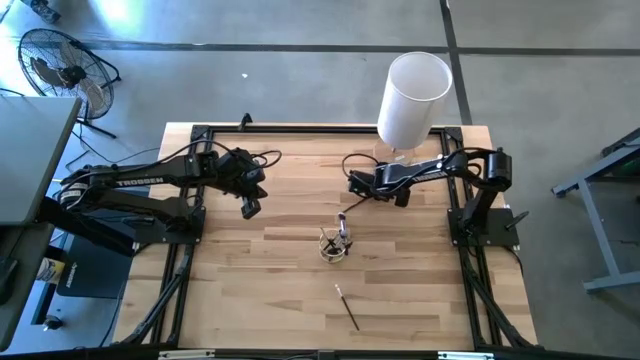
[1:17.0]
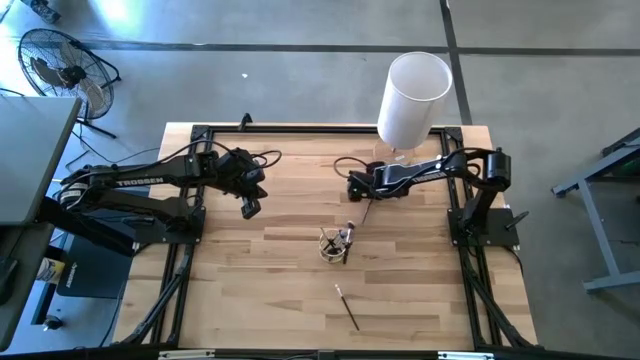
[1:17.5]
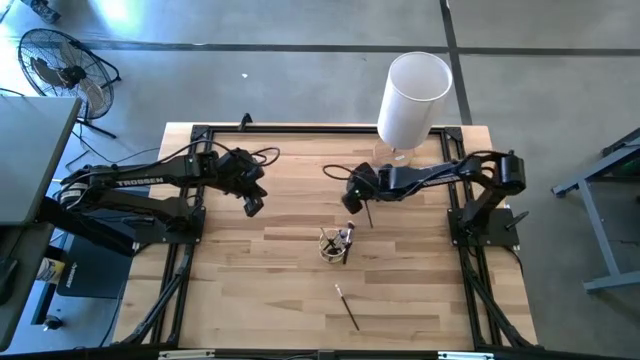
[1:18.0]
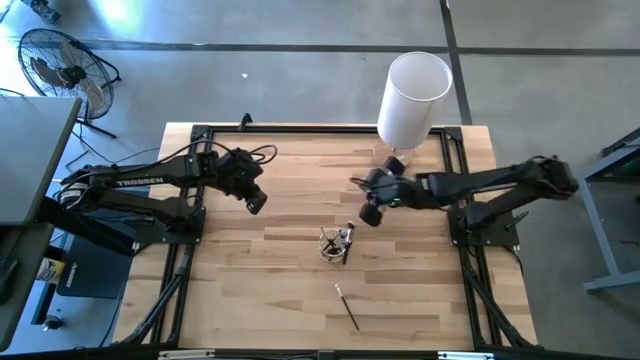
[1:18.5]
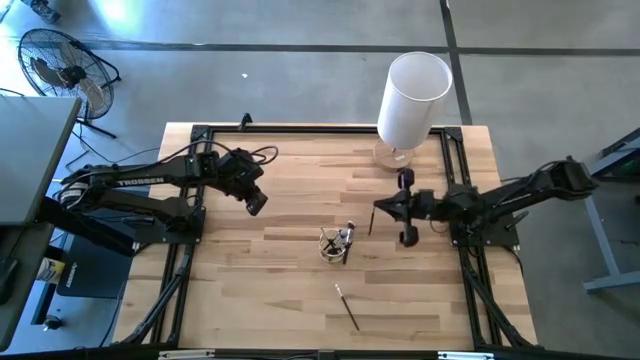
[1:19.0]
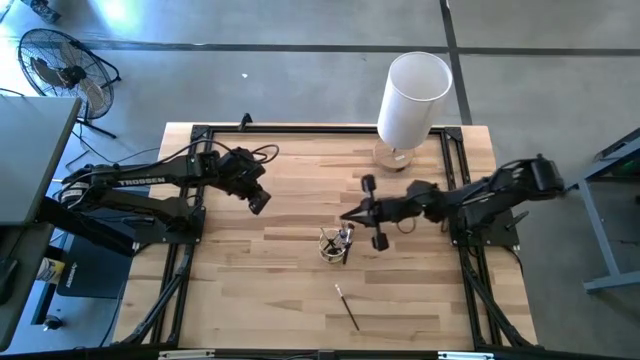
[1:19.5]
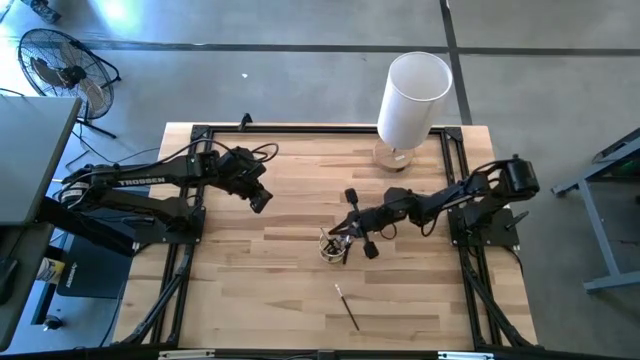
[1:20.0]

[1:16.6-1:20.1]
Task: Put items in baskets/containers
Put the eyeshadow brush into the mesh organizer

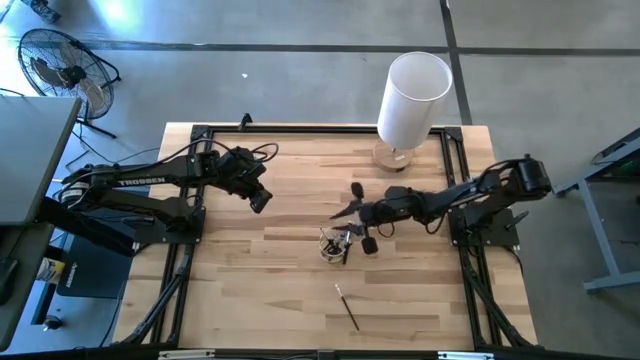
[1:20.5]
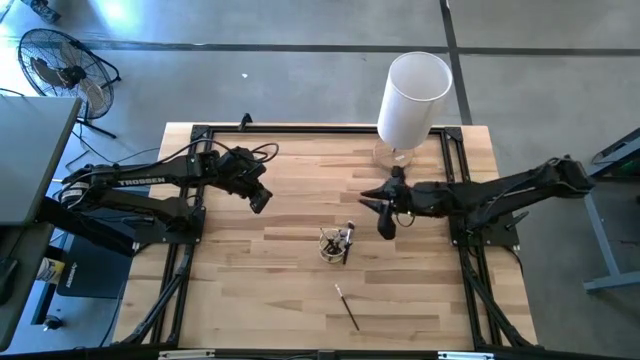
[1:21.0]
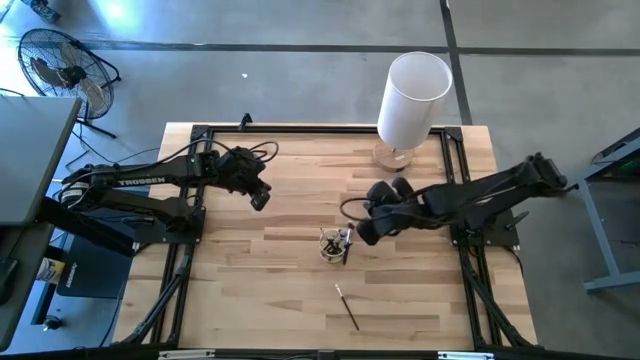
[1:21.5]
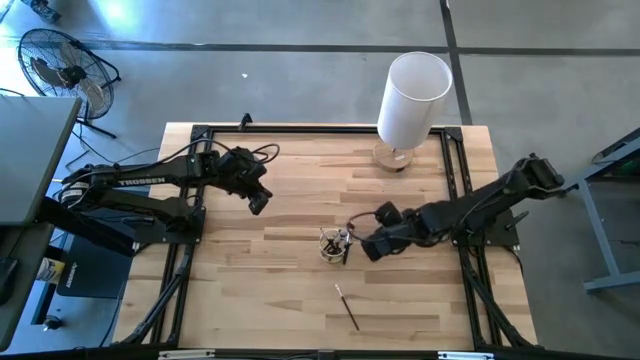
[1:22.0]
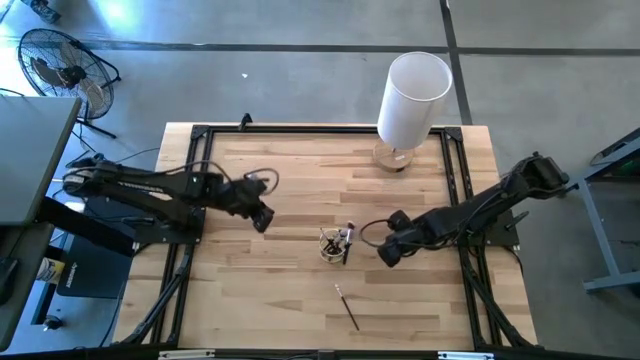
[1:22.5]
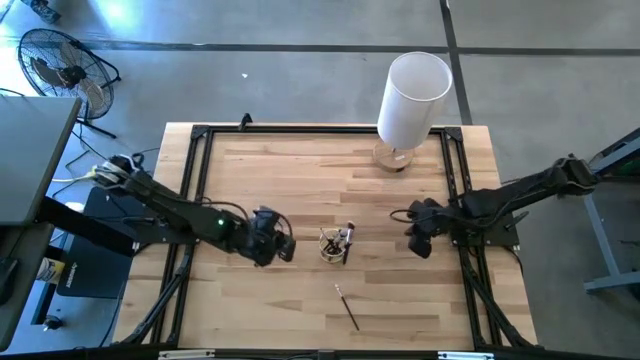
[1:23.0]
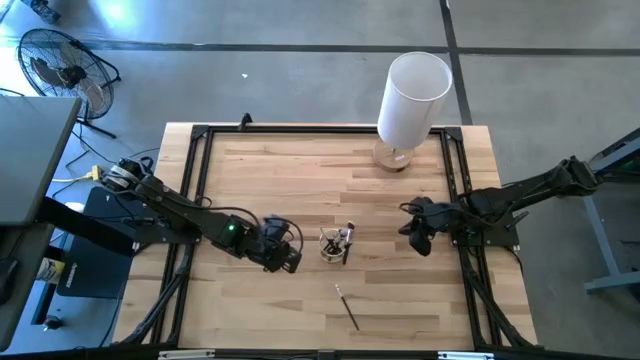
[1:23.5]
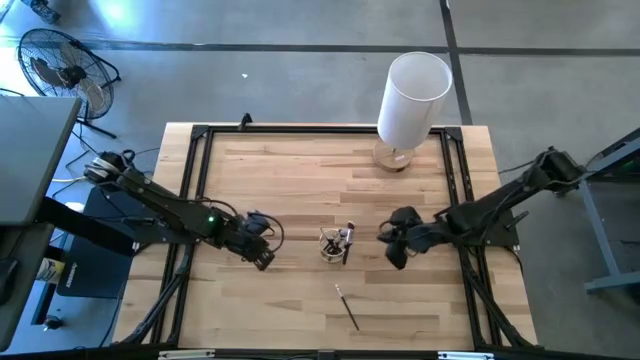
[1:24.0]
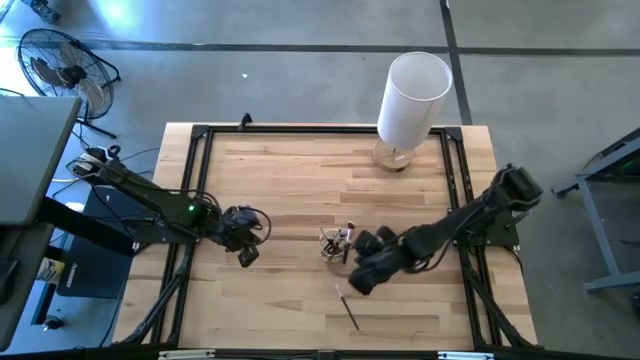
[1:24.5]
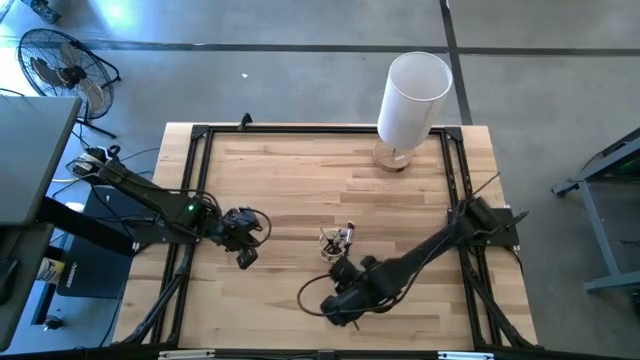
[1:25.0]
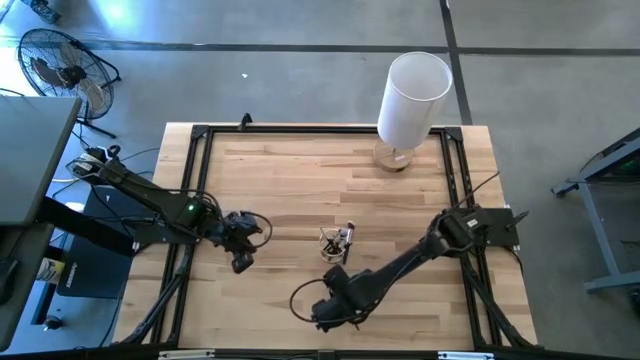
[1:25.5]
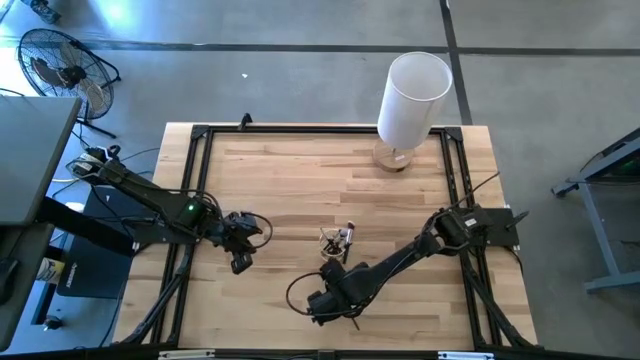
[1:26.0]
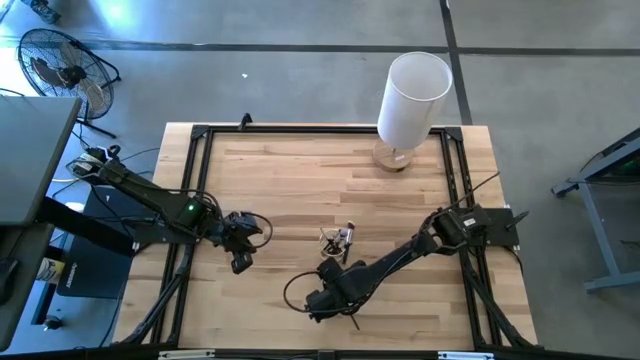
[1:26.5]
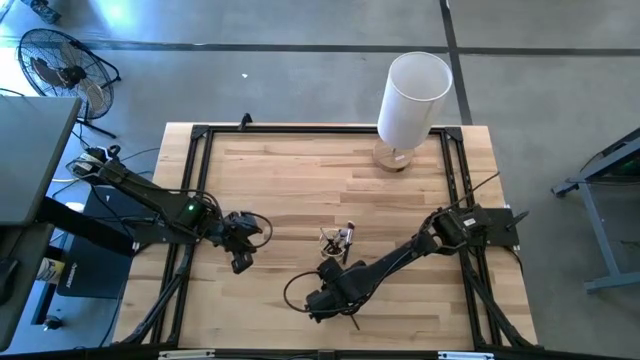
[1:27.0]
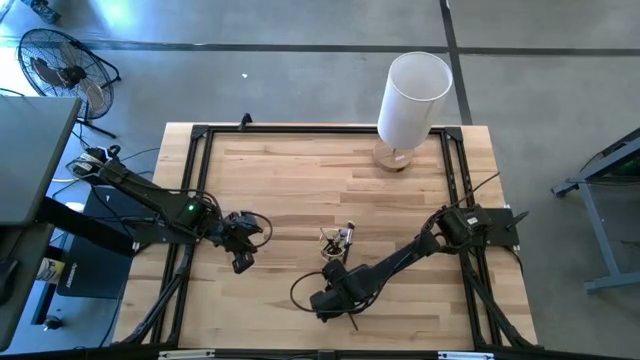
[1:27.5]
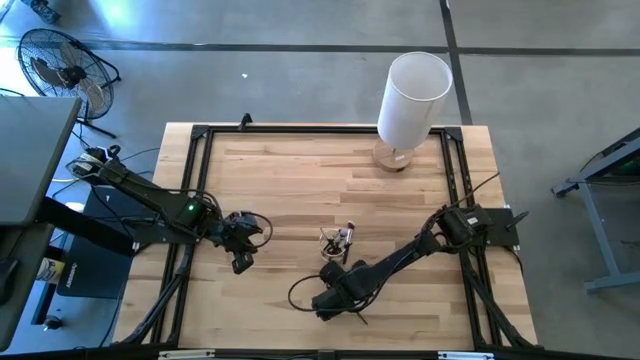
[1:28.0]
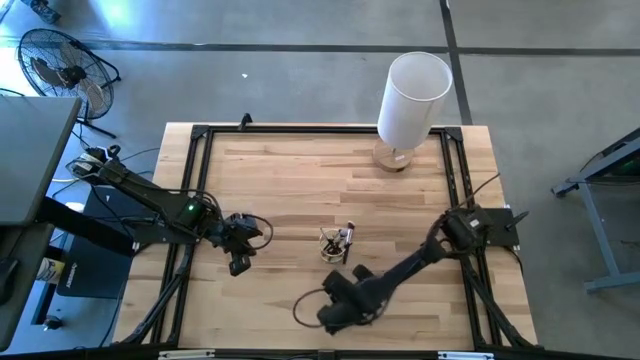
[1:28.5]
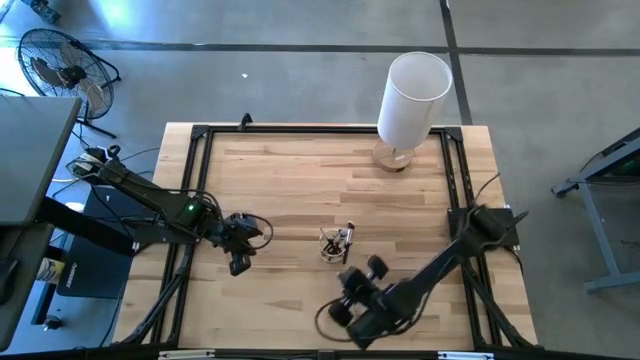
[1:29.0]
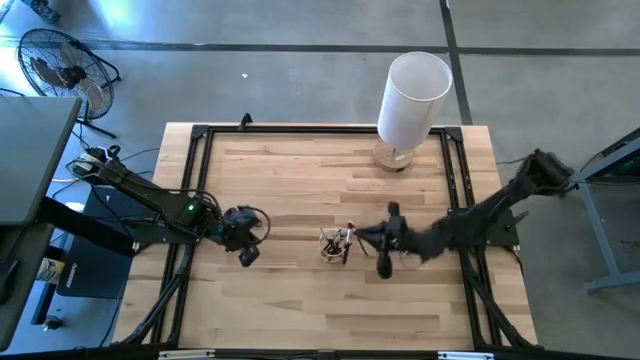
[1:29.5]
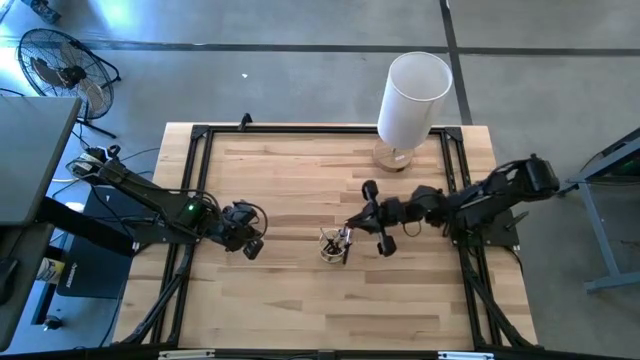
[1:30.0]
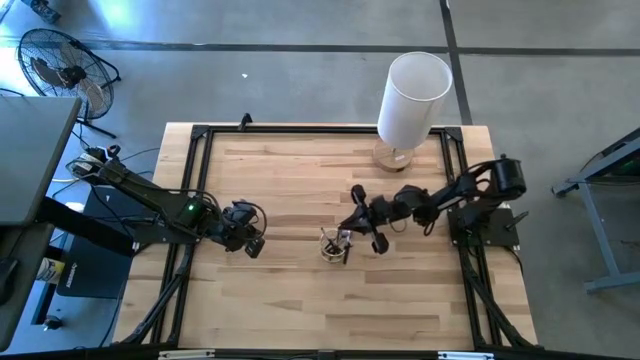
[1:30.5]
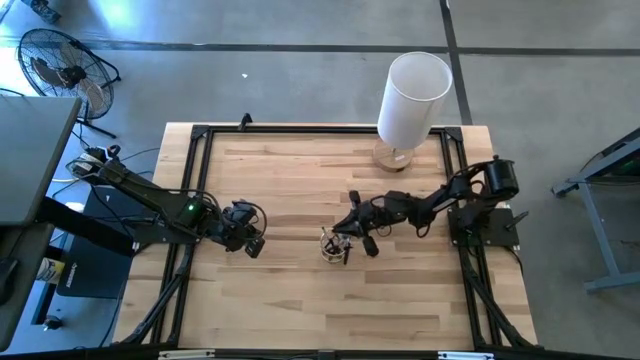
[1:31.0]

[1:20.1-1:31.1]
Put the eyeshadow brush into the mesh organizer

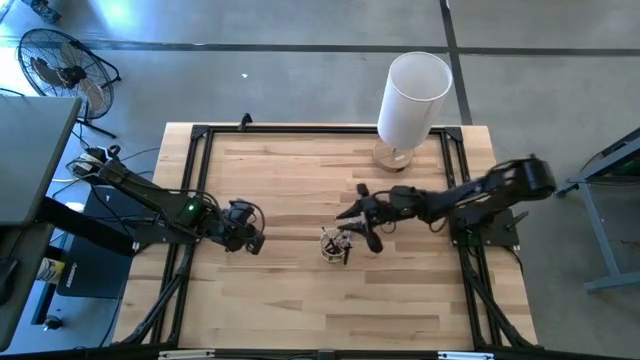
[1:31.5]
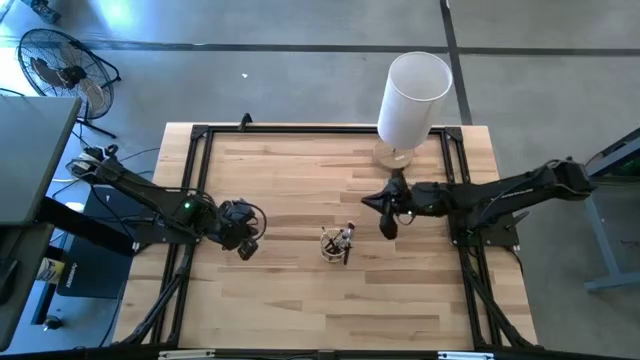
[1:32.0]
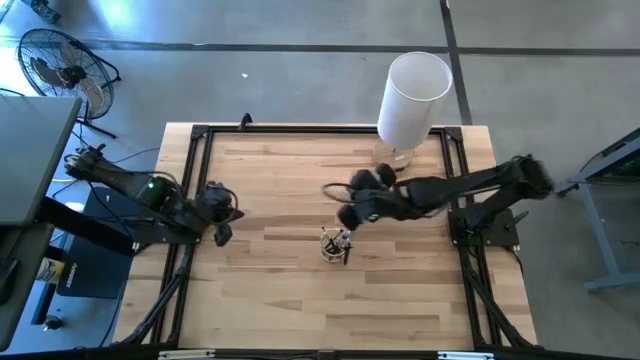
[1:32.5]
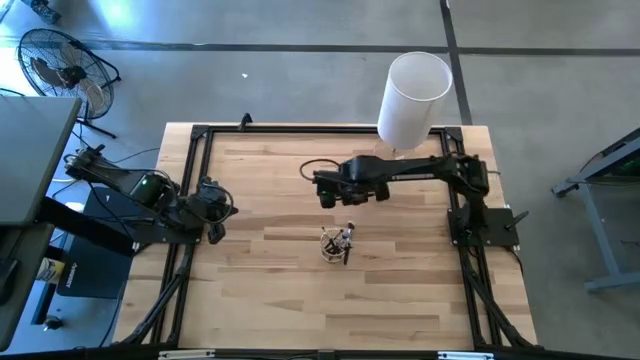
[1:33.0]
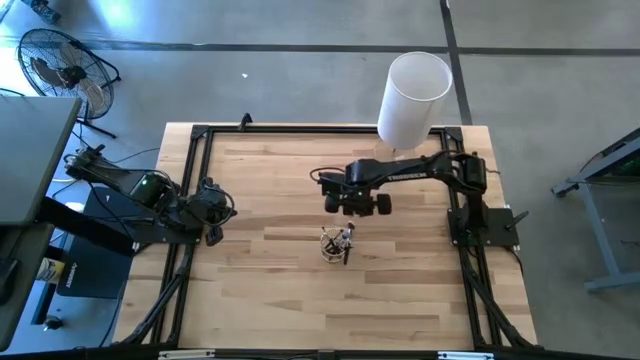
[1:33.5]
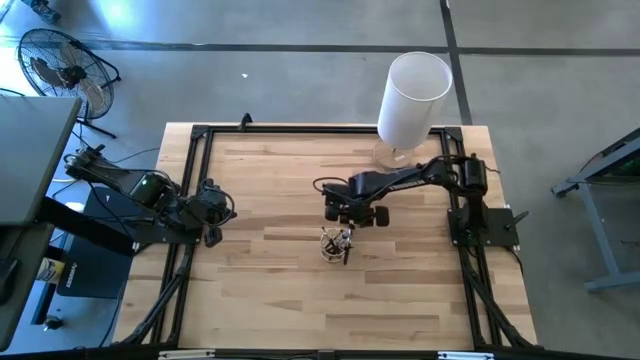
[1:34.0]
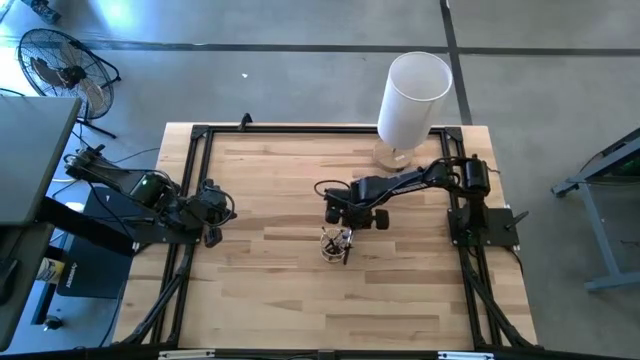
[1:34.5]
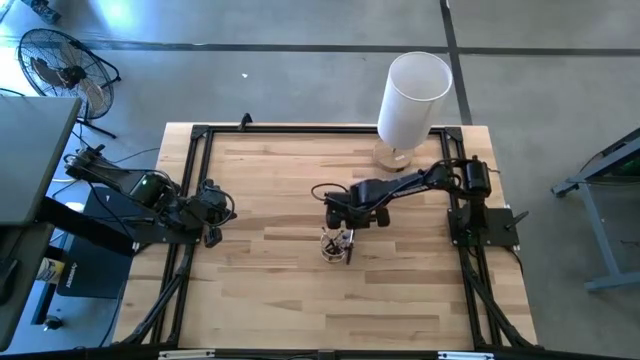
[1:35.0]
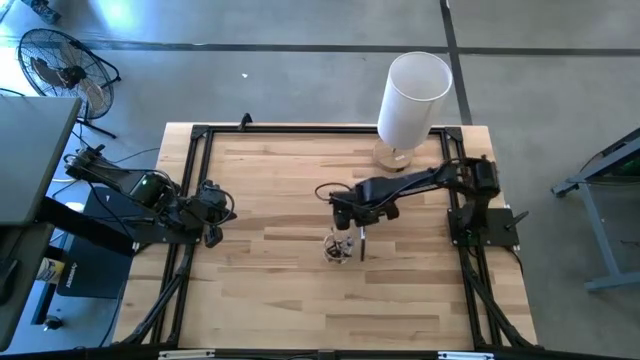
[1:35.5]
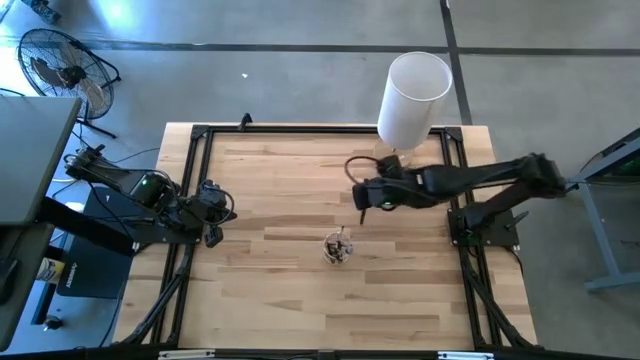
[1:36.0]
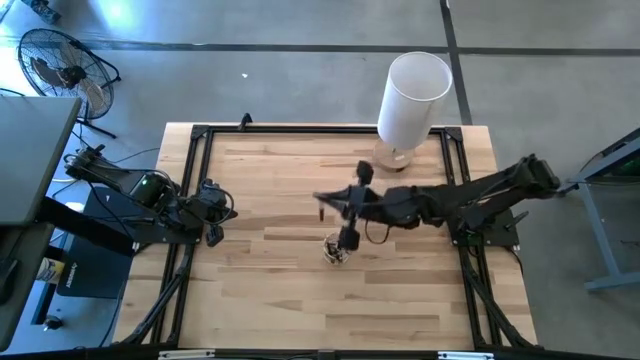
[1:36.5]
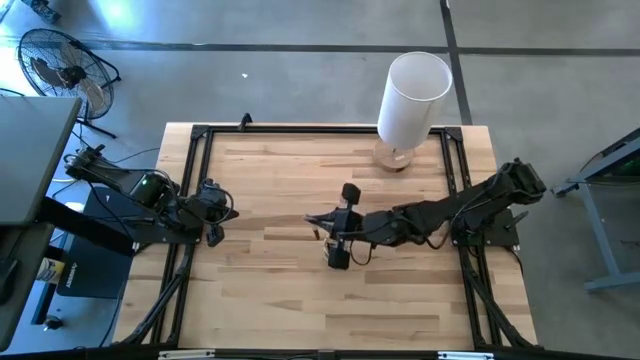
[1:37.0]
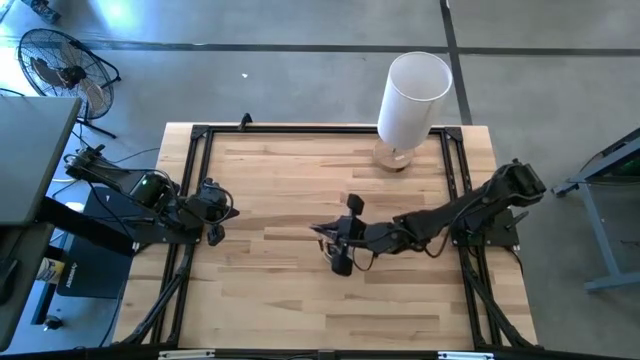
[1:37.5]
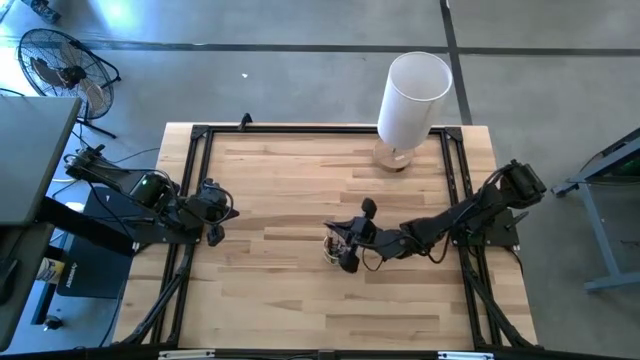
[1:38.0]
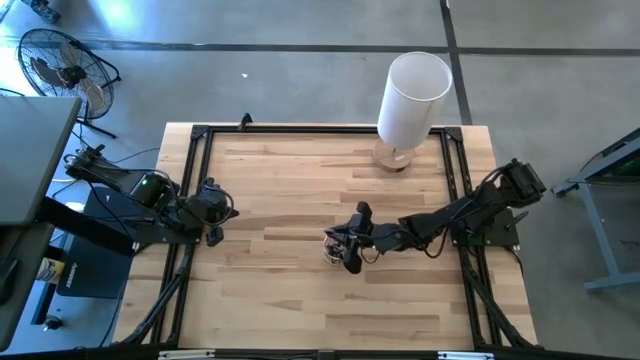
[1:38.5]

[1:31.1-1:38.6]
Put the powder brush into the mesh organizer
